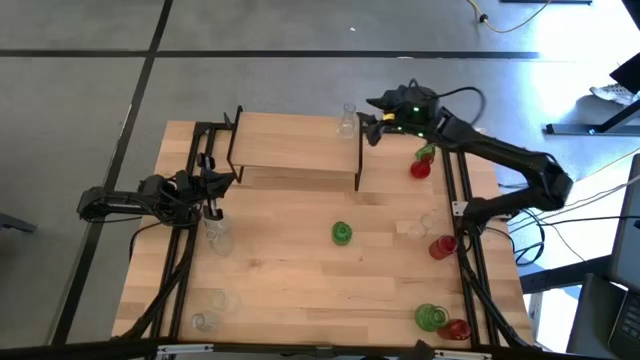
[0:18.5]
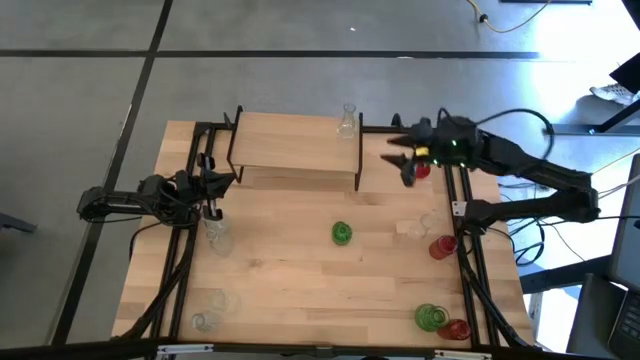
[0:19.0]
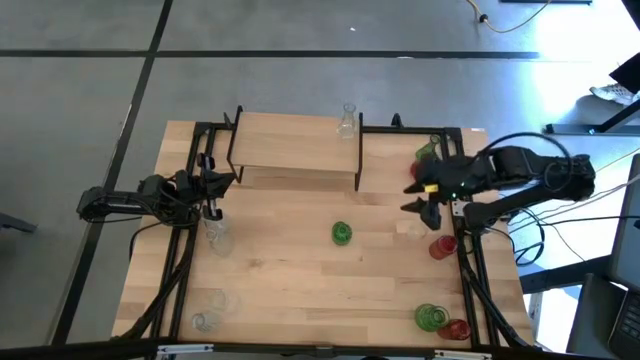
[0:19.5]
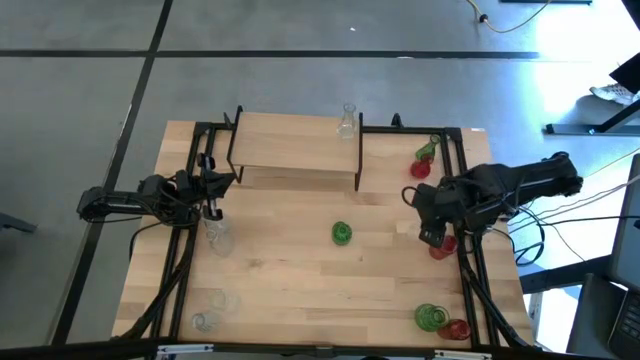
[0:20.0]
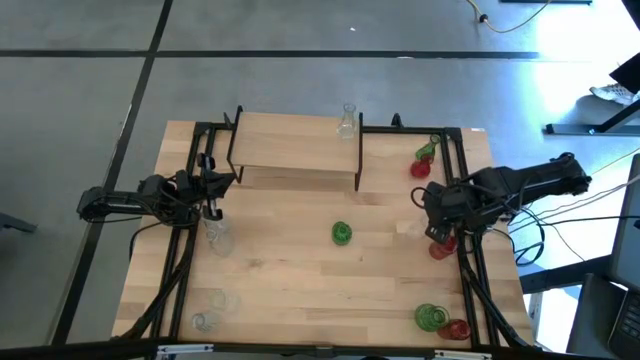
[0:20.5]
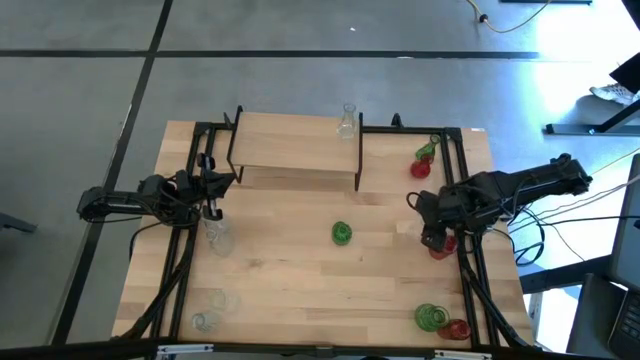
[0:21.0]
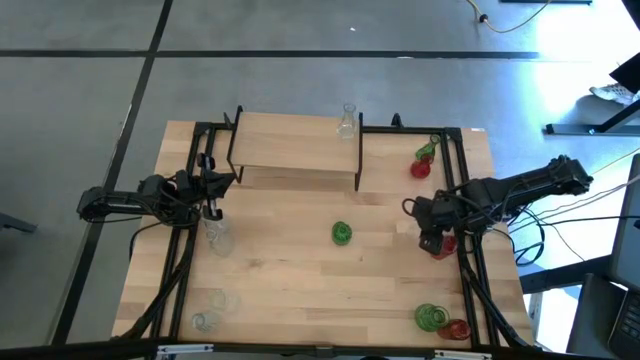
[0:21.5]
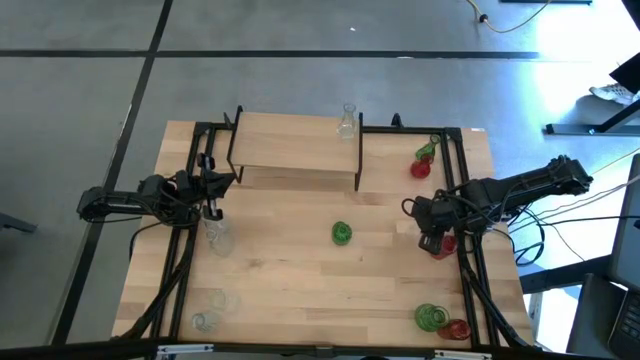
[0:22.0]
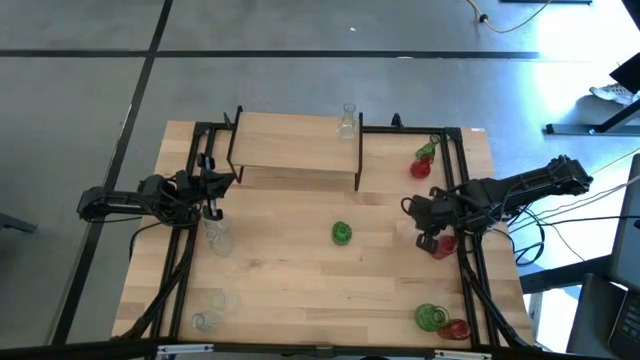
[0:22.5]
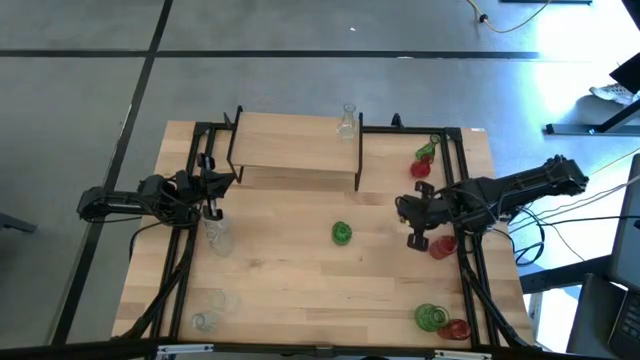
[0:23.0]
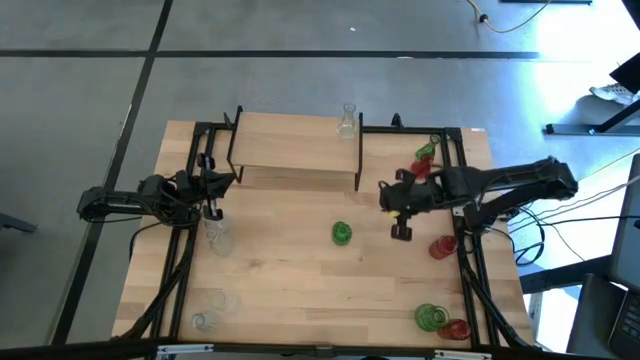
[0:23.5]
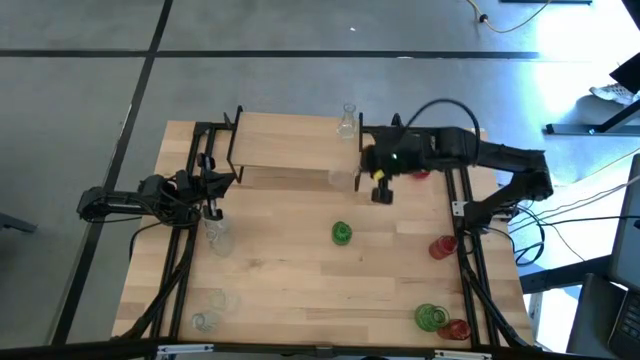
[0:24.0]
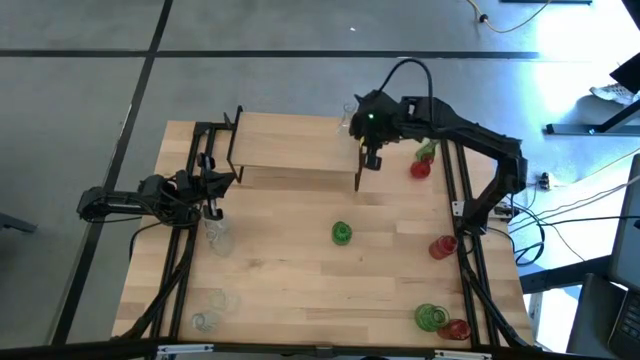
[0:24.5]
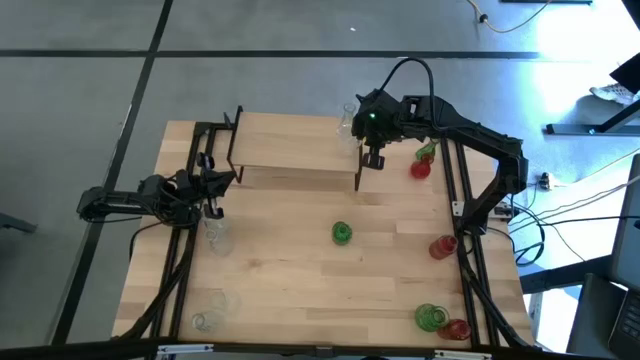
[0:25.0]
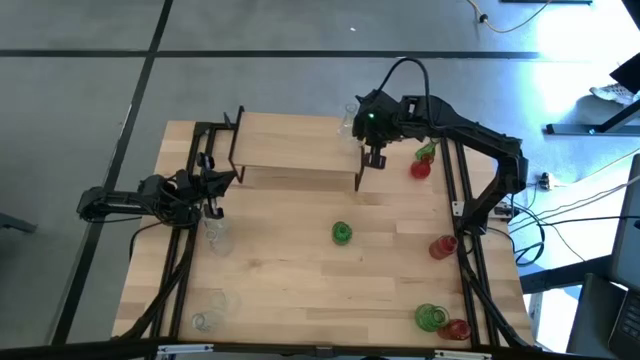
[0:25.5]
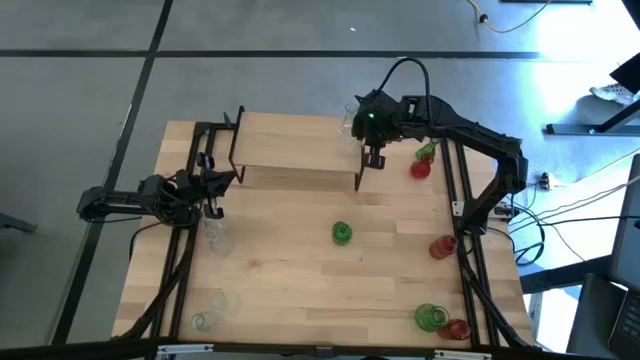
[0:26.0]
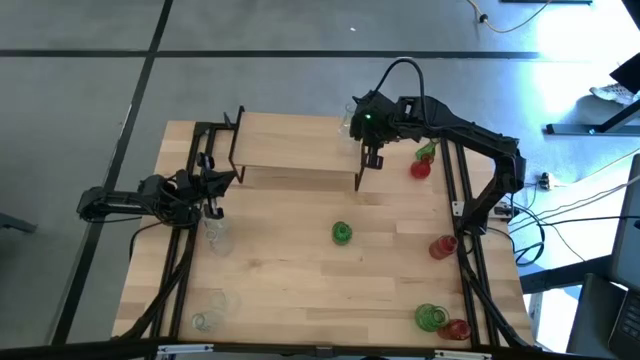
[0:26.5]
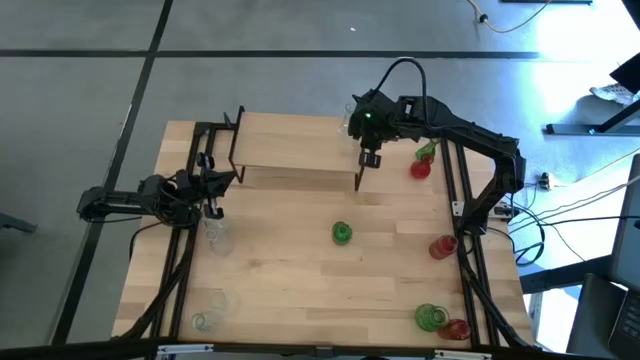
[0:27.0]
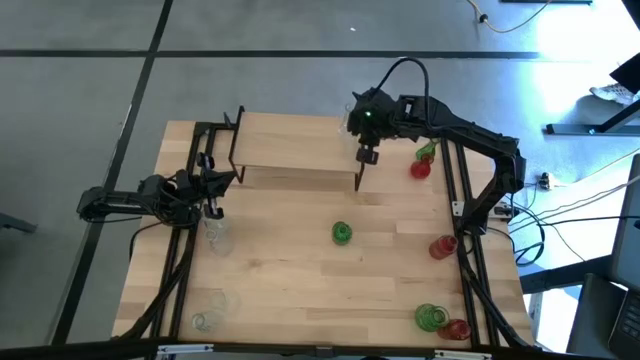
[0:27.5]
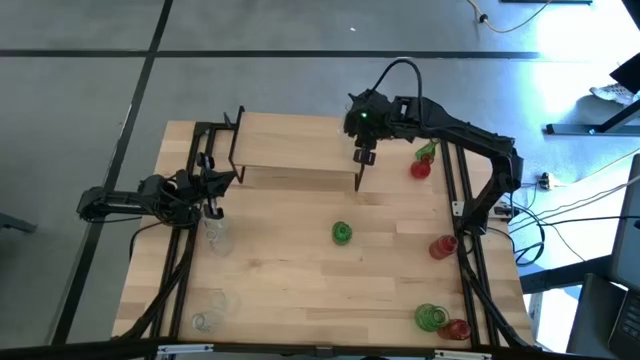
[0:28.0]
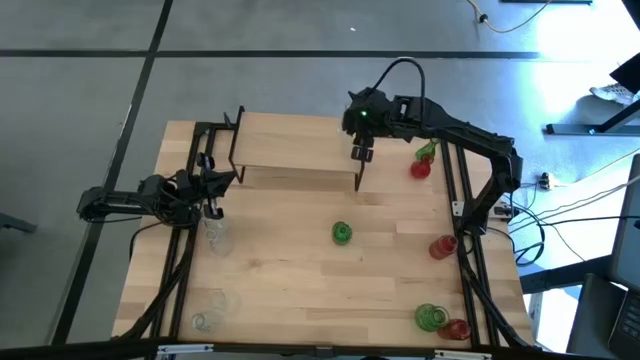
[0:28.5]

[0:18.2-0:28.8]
Task: sort vases onto shelf
Put the transparent vase aligned with the other transparent vase on the shelf

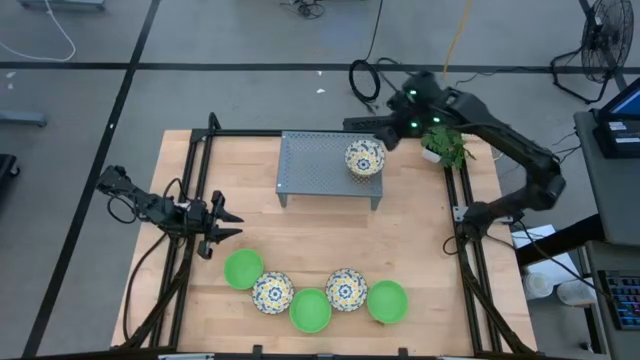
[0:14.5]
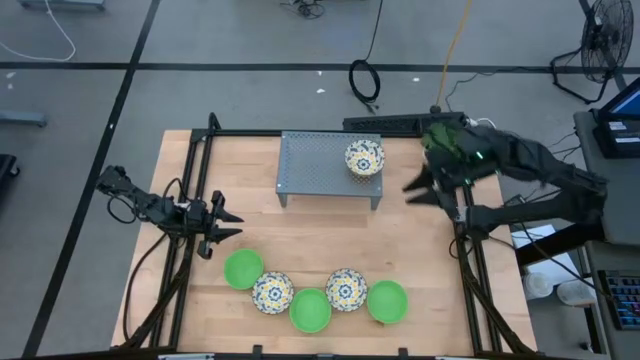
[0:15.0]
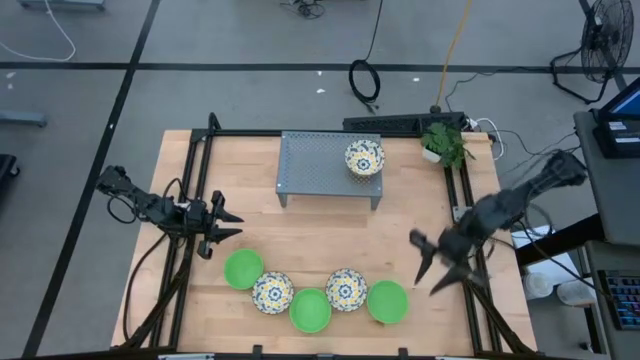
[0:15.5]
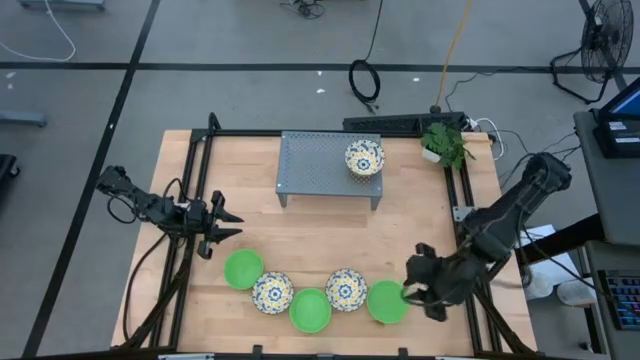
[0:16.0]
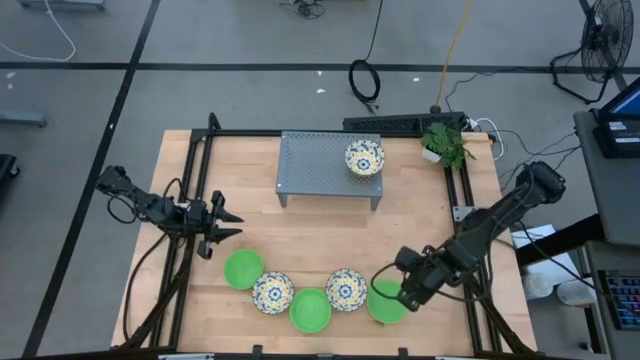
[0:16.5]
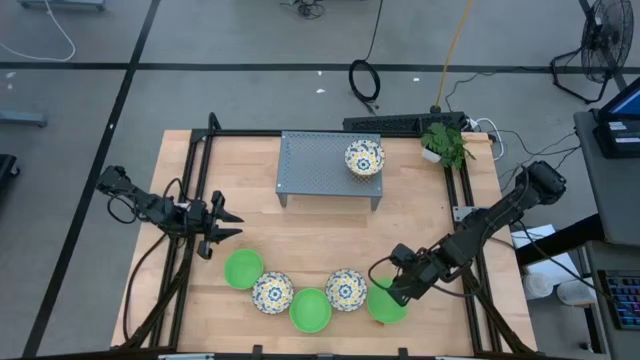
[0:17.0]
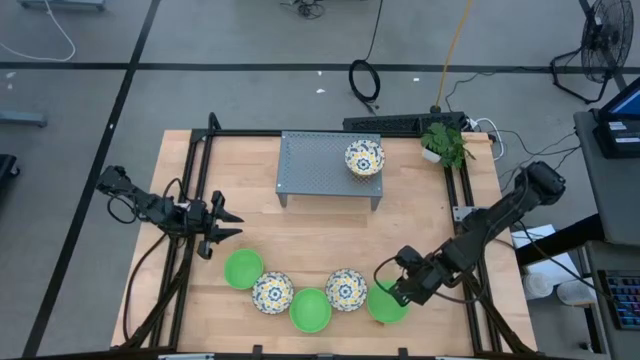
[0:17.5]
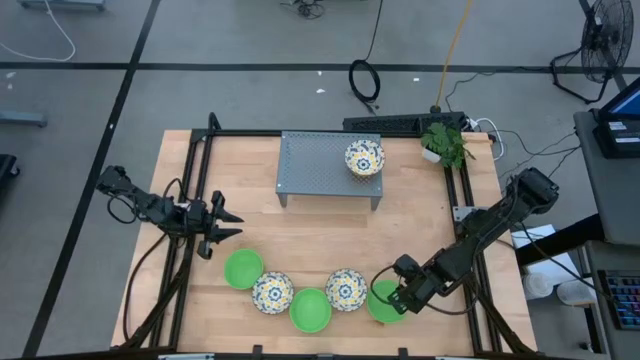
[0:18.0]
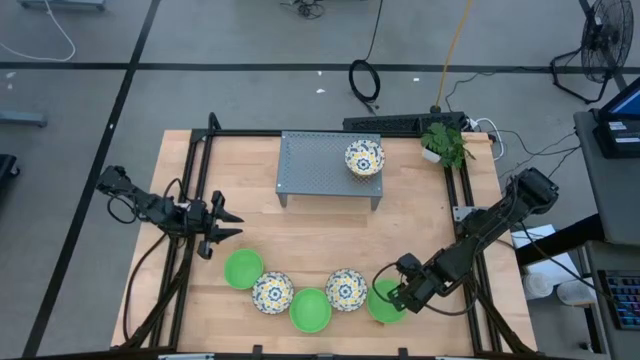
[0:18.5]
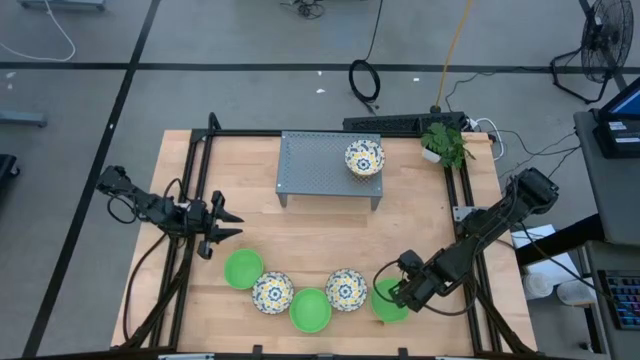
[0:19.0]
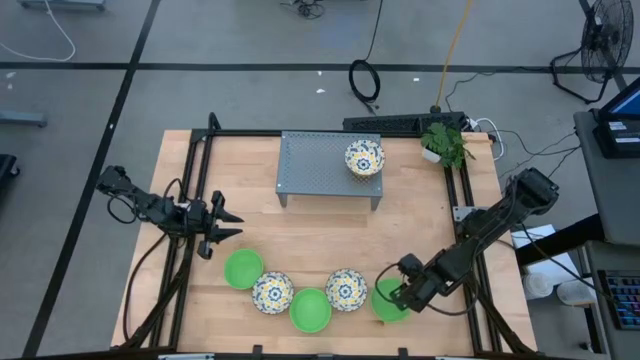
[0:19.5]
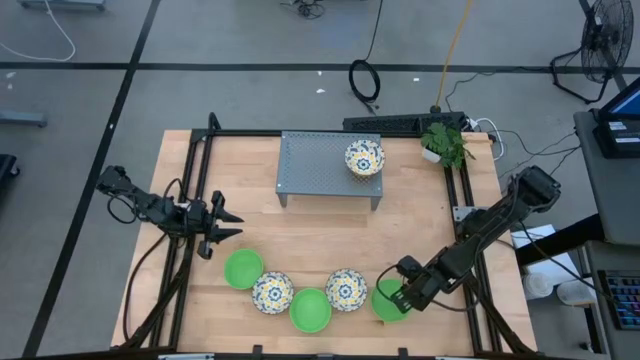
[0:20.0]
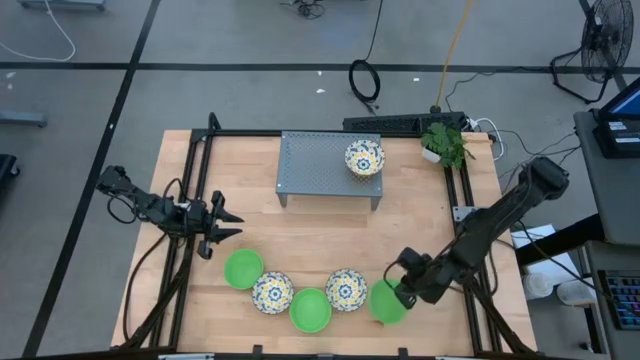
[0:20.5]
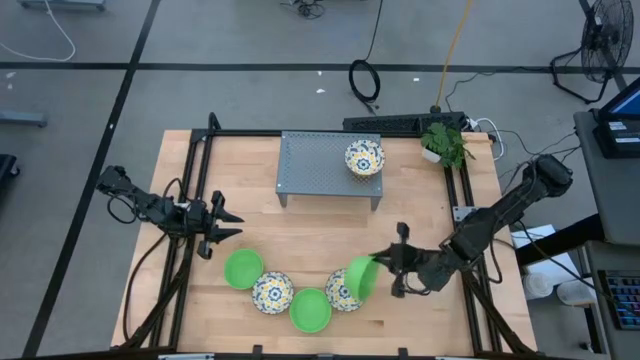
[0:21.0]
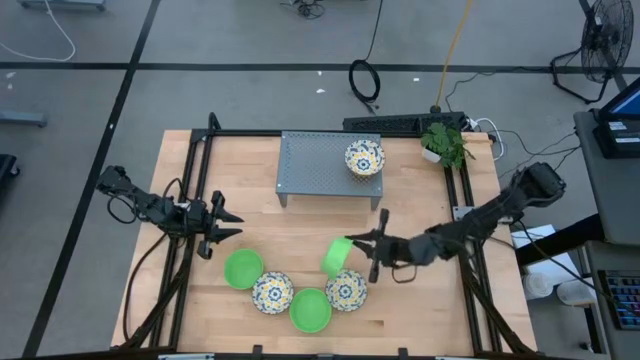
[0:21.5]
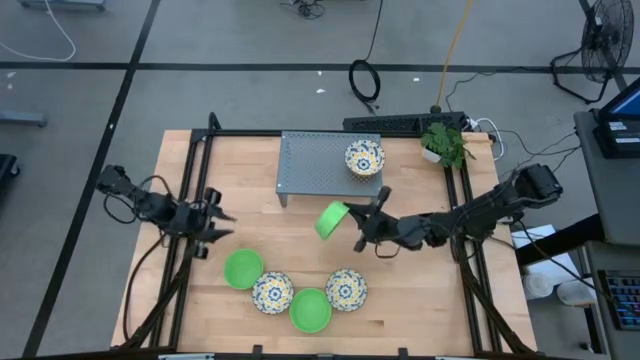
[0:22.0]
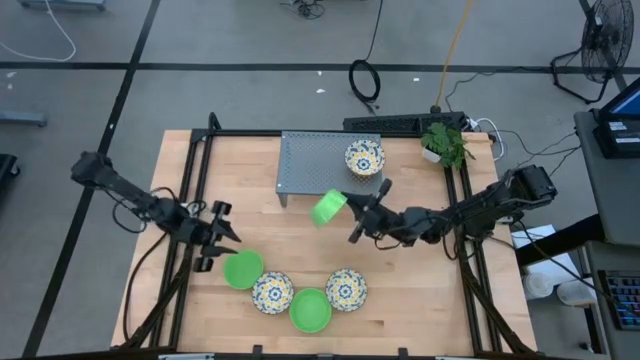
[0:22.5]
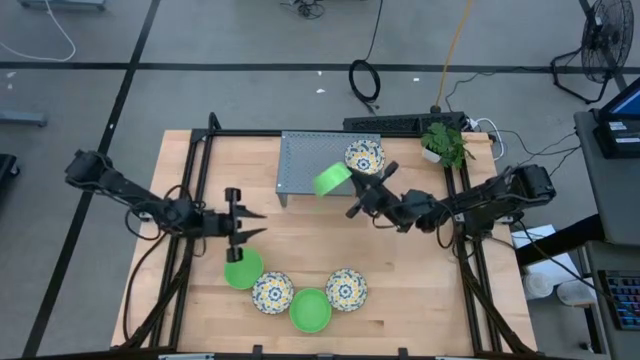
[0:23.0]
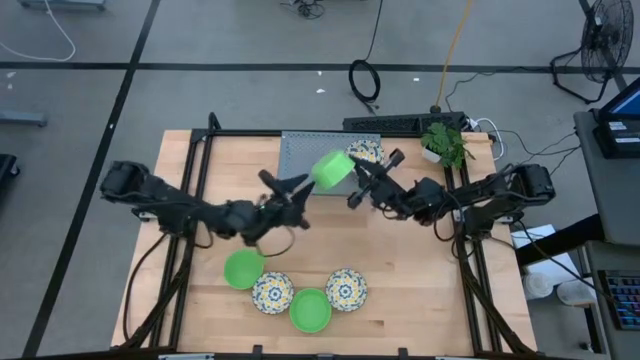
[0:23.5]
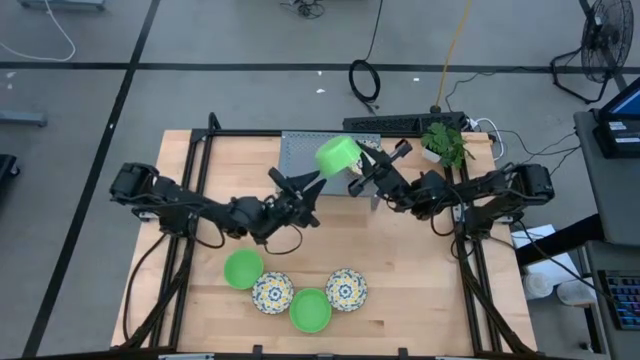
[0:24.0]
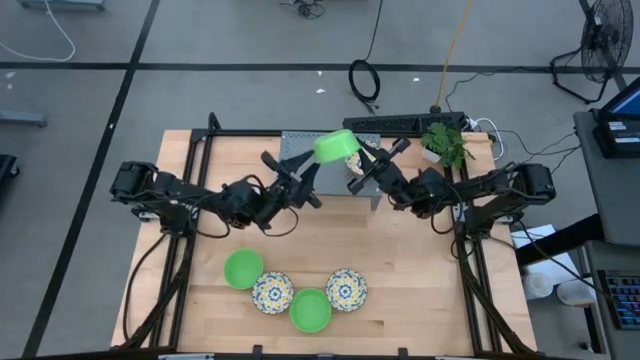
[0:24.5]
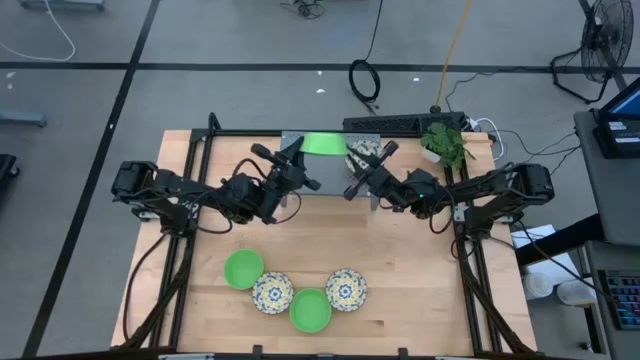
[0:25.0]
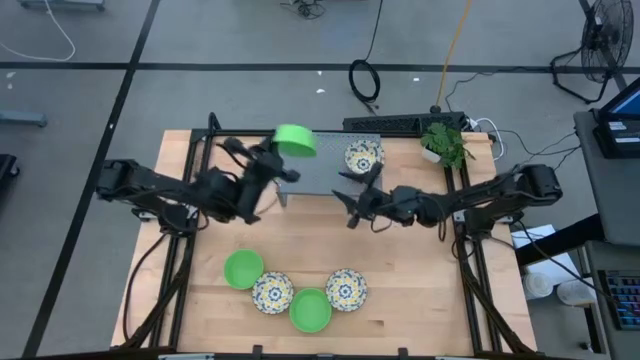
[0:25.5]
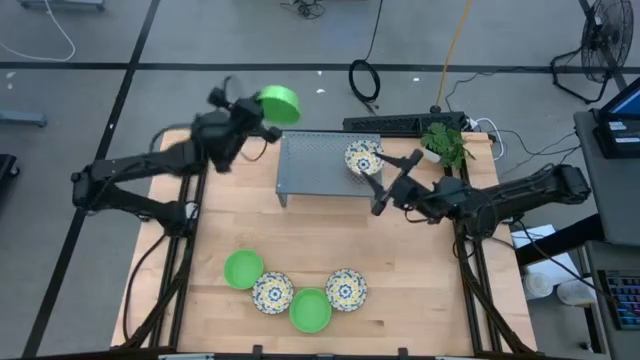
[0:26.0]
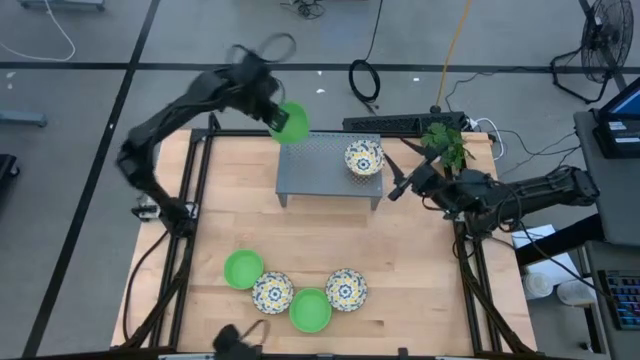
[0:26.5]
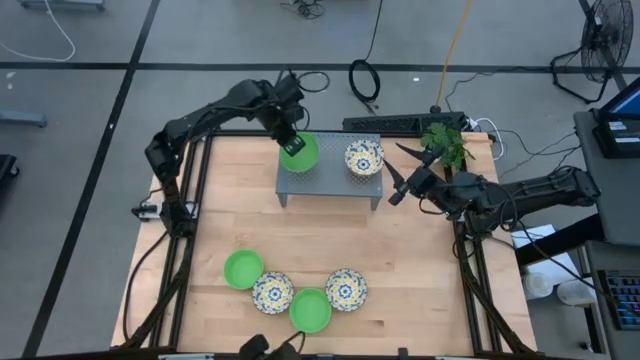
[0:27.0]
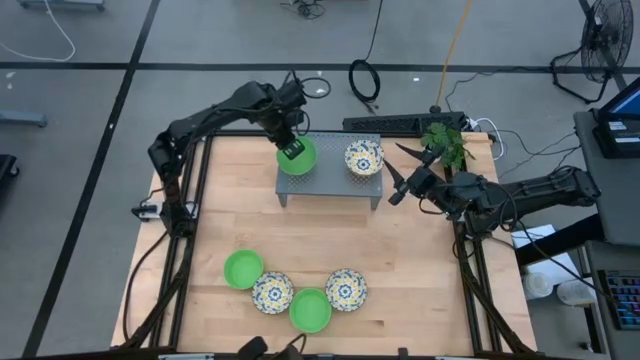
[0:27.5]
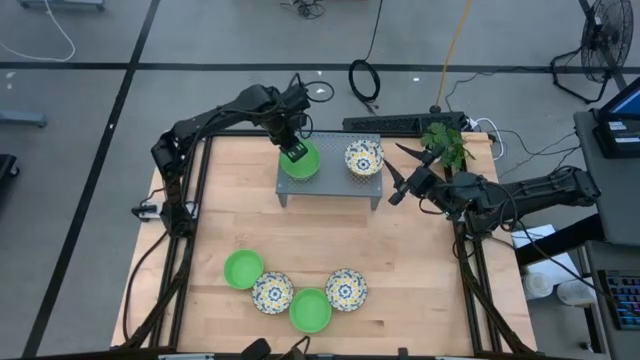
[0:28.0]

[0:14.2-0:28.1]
Task: Pick & Place Mini bowls
Put the right green bowl on the shelf
